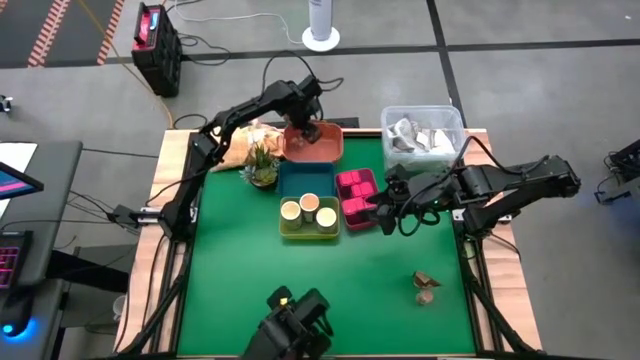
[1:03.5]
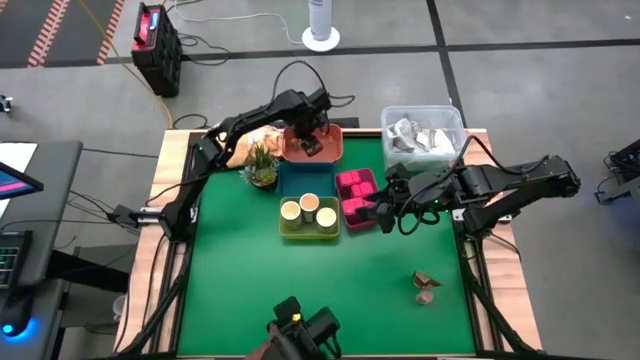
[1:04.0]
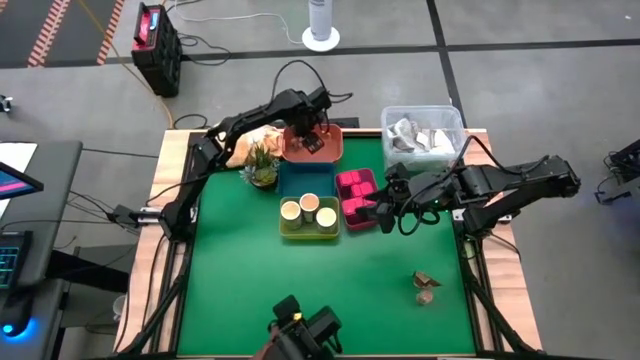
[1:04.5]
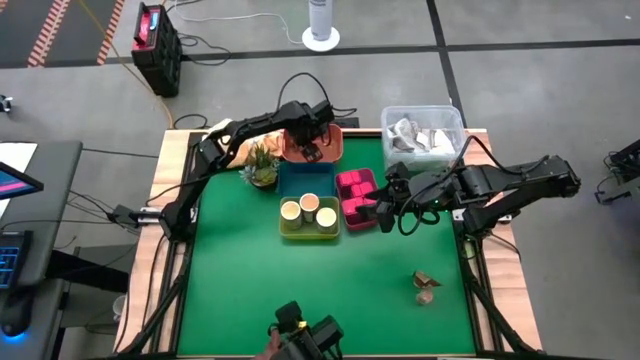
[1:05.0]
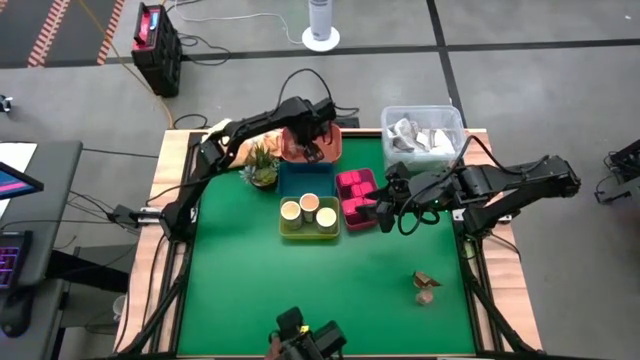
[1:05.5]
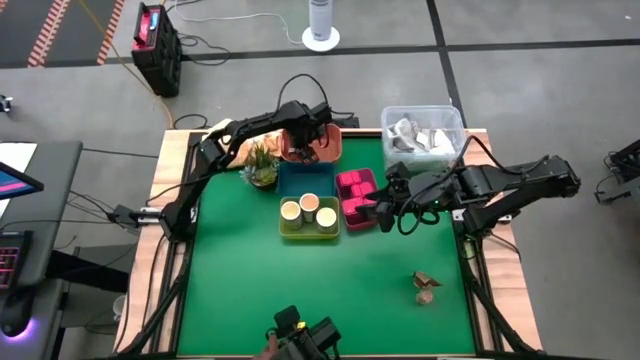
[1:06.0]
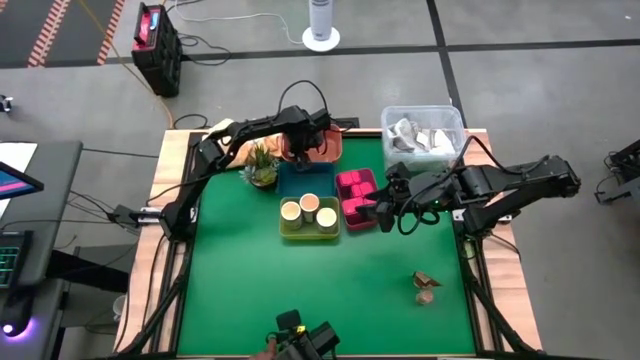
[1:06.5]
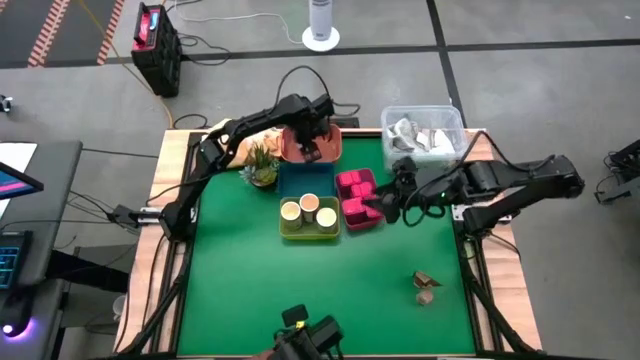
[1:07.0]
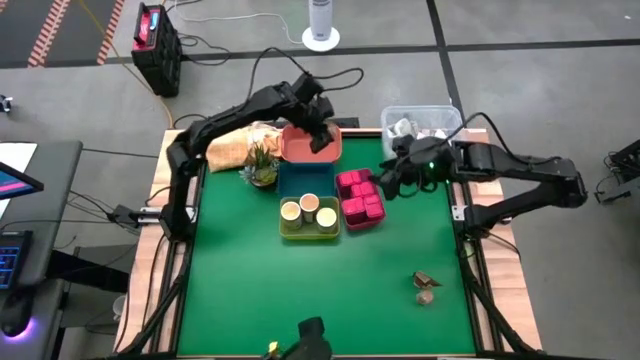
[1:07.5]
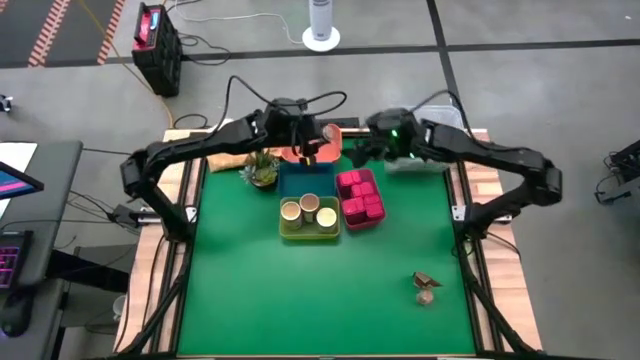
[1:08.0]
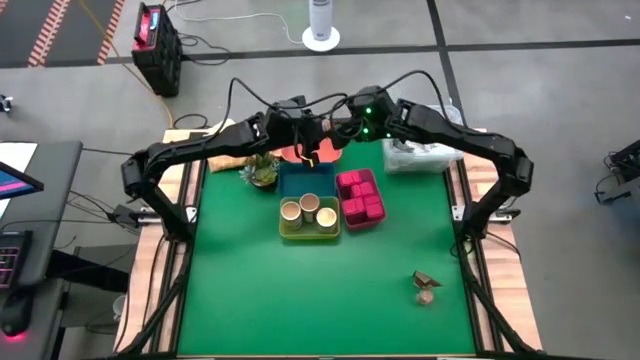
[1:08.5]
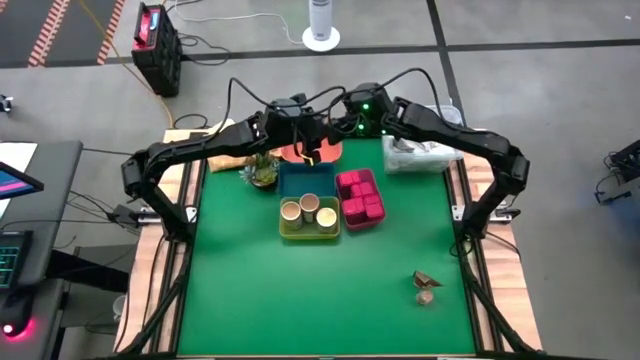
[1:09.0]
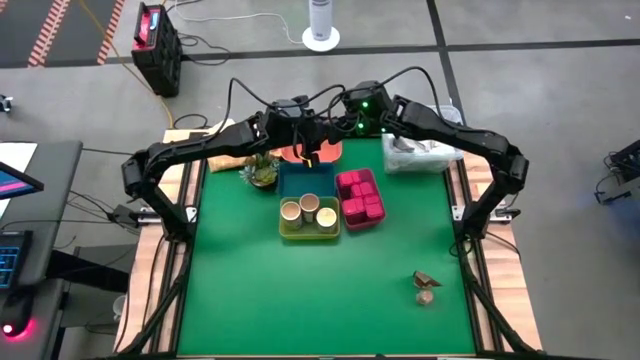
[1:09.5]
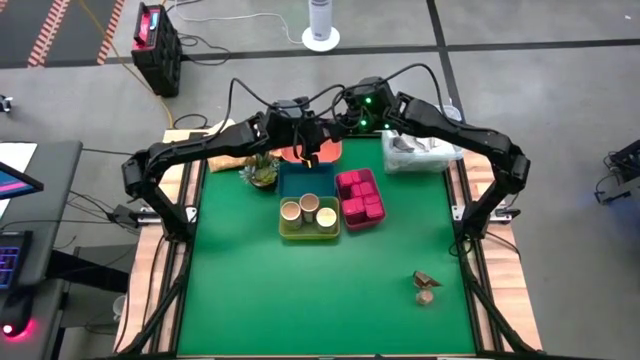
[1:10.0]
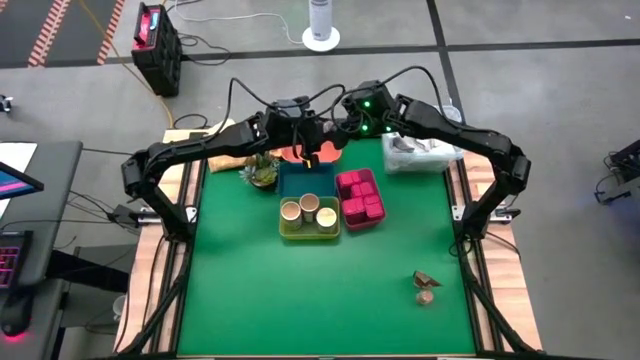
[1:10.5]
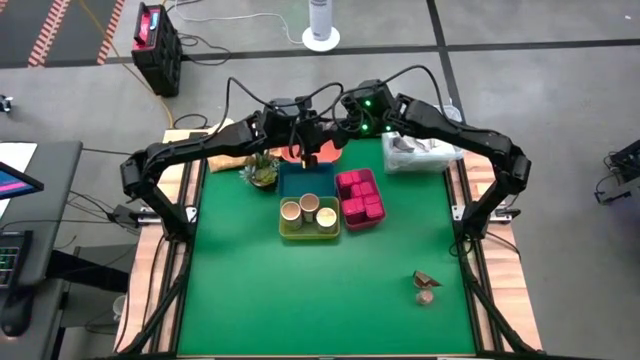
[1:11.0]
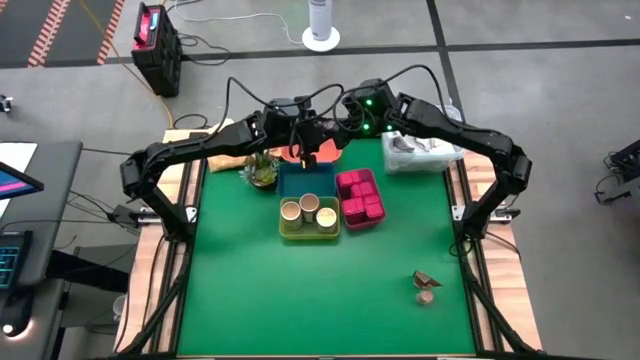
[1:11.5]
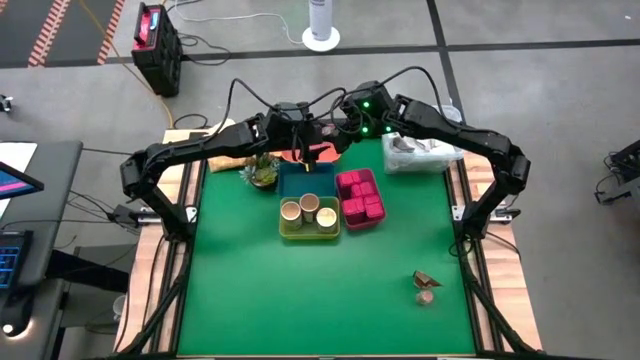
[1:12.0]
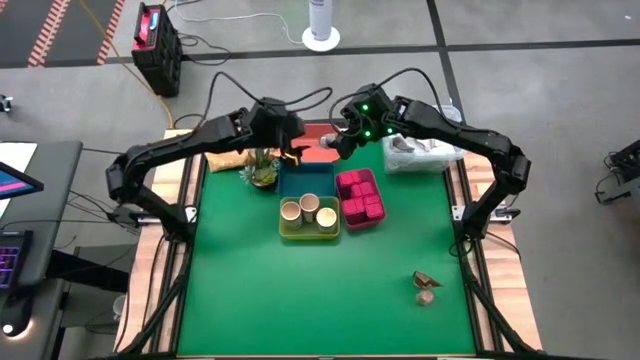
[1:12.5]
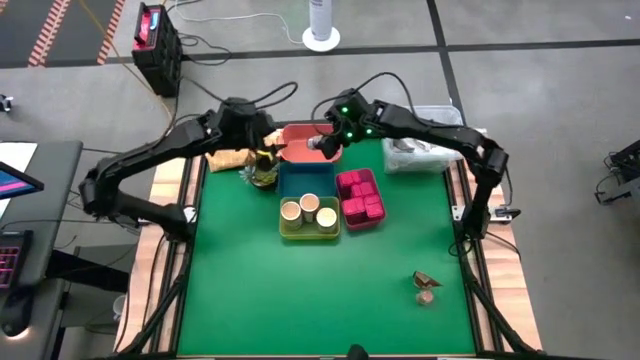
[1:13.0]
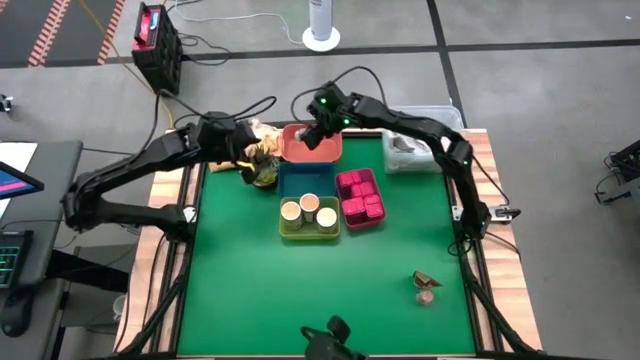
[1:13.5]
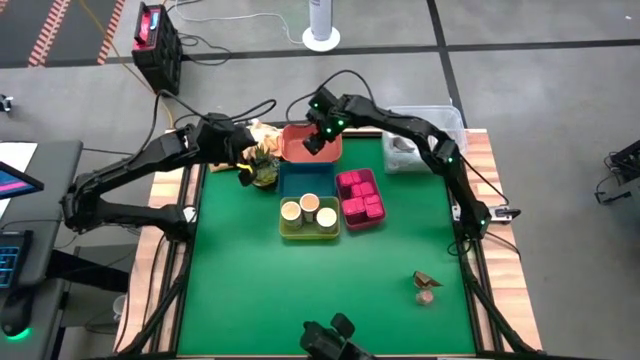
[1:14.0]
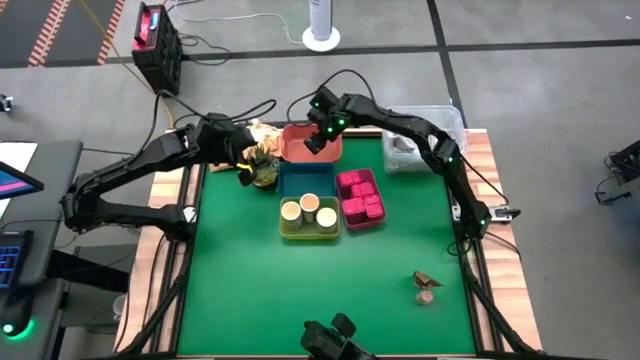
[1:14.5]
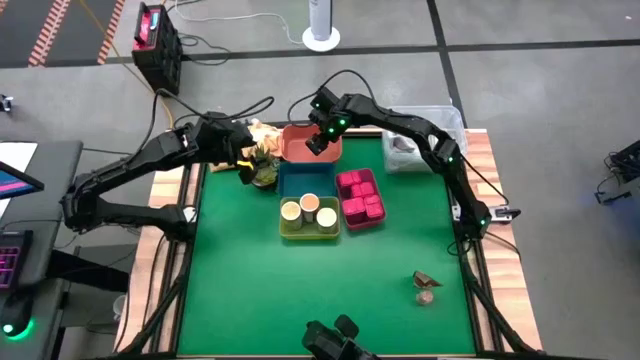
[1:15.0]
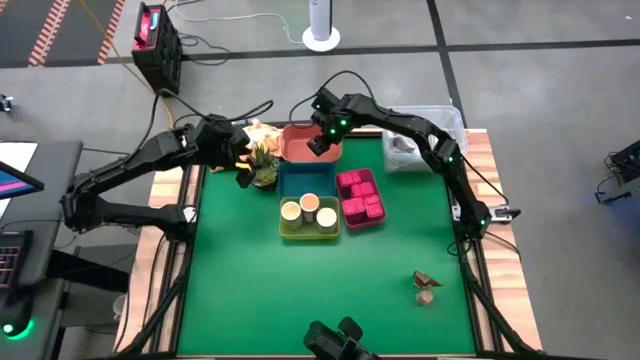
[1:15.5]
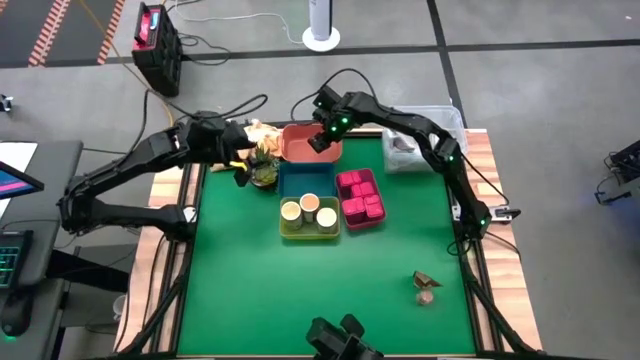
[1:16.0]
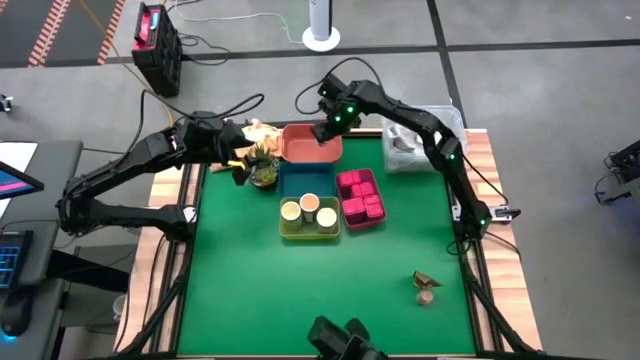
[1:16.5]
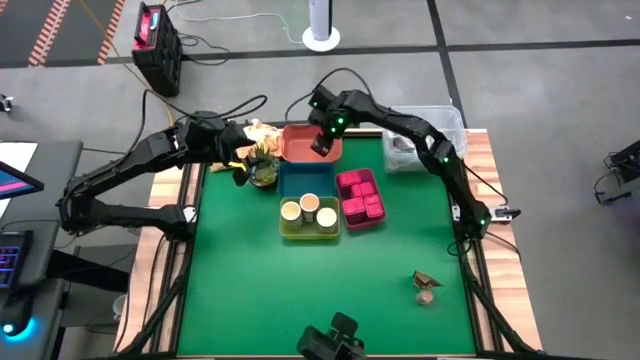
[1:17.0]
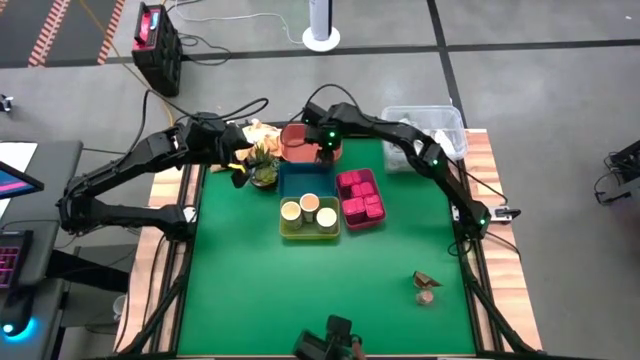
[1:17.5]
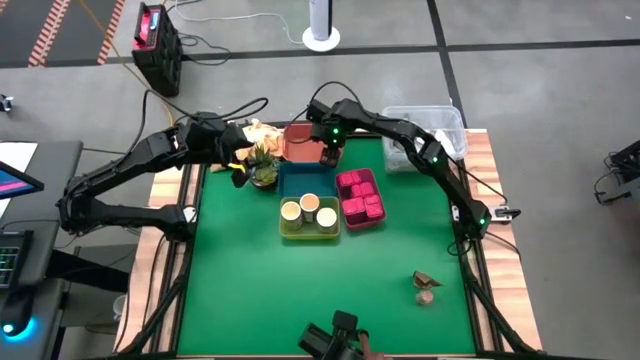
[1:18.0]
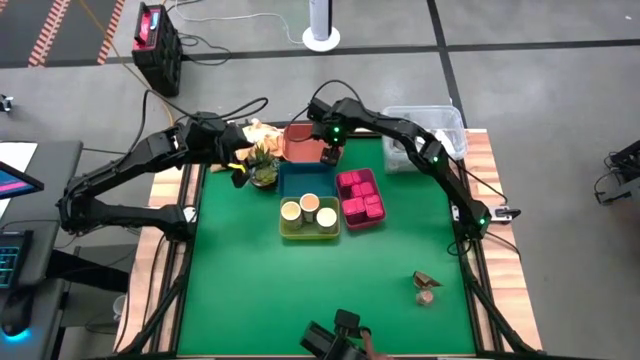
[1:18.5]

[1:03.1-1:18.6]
Task: Sort spices by type
Put the left brown seasoning bottle into the orange bin

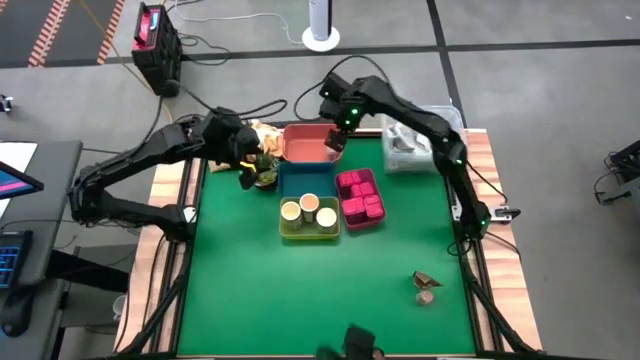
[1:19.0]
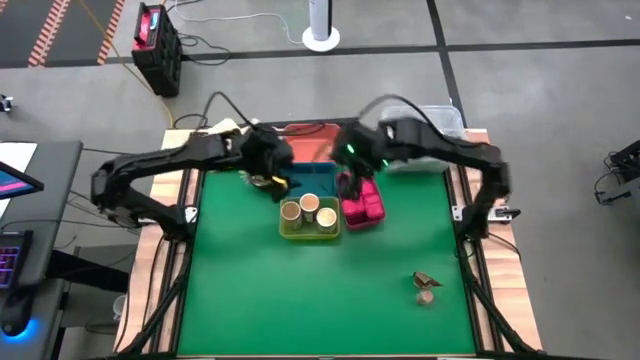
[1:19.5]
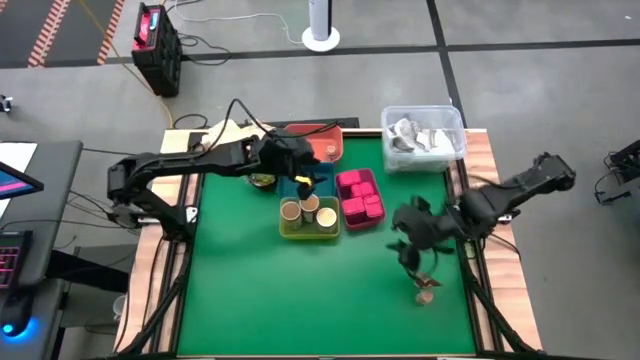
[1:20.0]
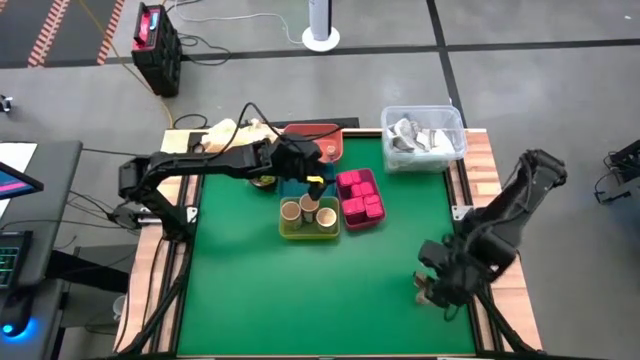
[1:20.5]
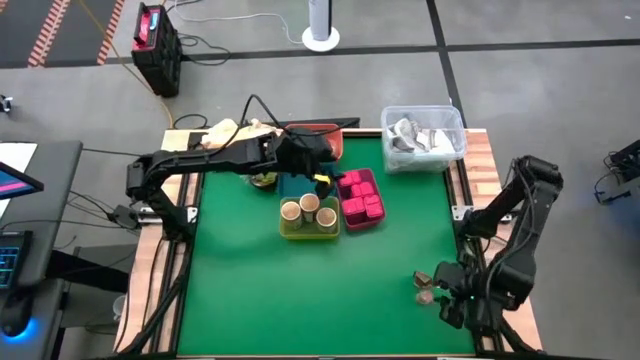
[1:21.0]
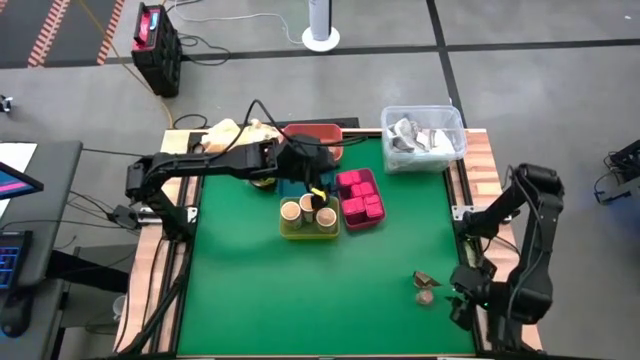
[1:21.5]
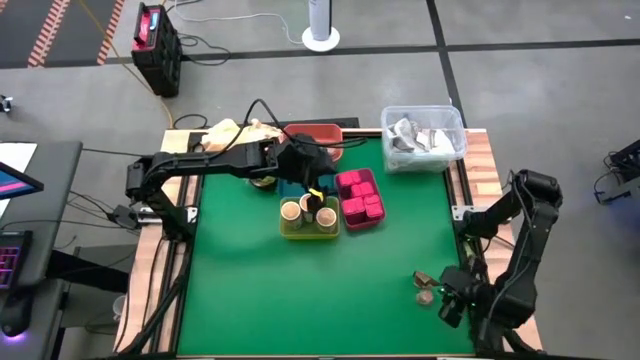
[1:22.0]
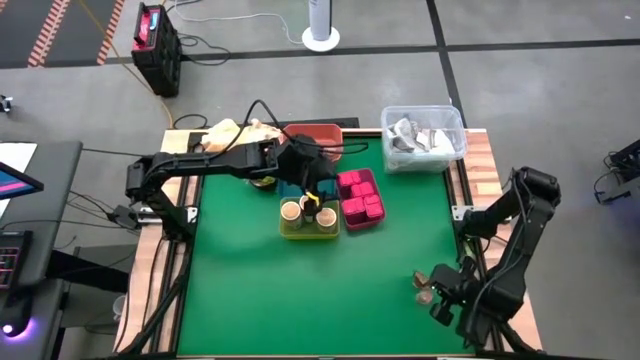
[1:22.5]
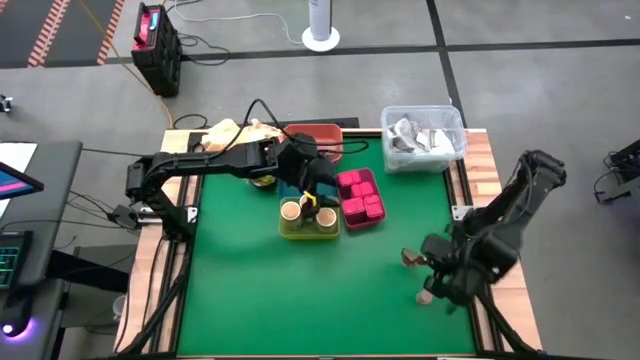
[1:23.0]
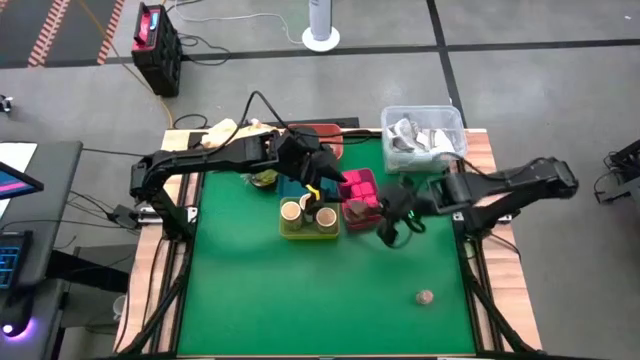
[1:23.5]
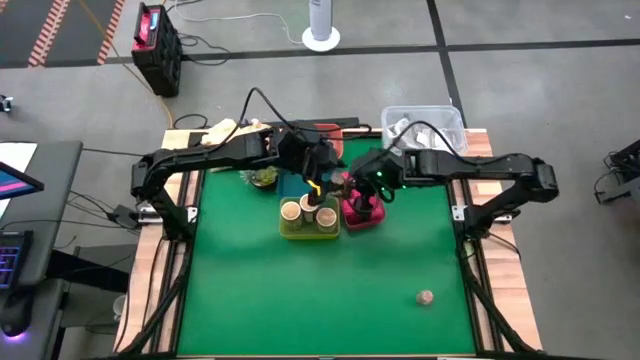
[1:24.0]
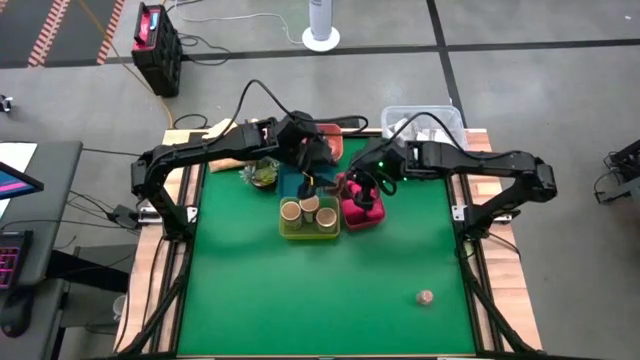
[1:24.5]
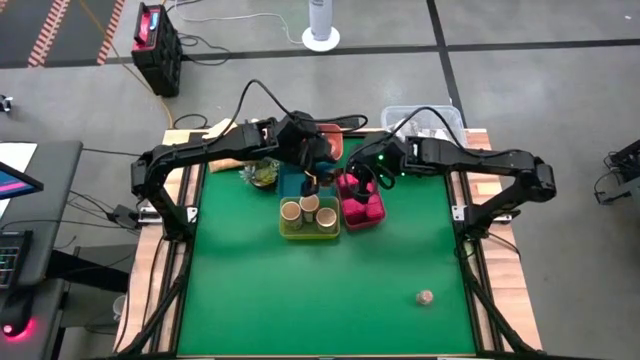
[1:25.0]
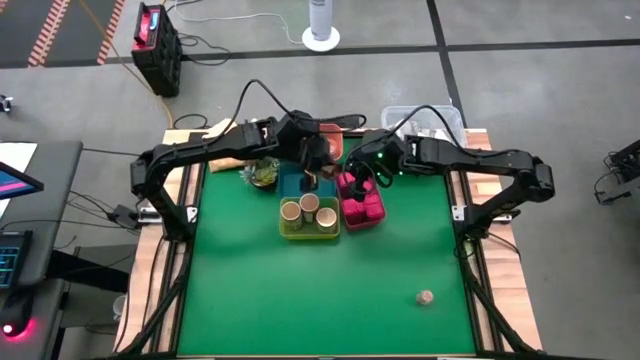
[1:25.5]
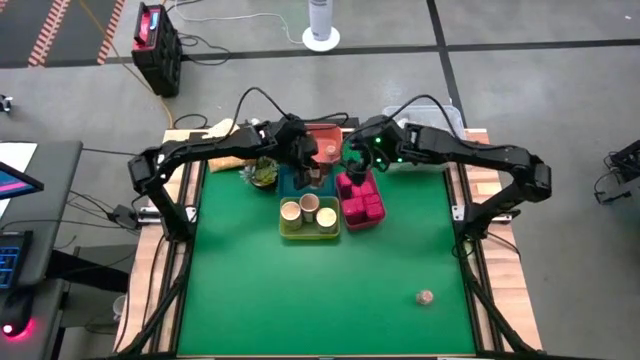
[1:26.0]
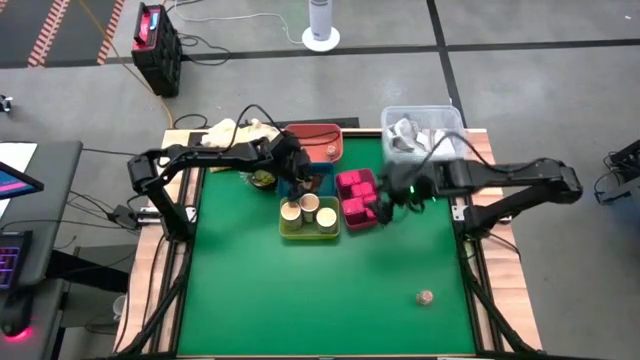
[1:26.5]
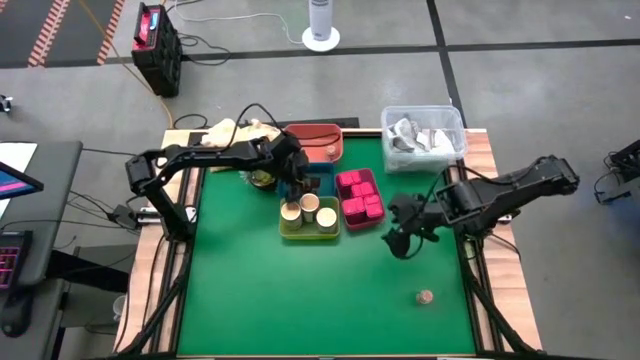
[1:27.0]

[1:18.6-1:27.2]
Put the orange seasoning pack into the blue bin
